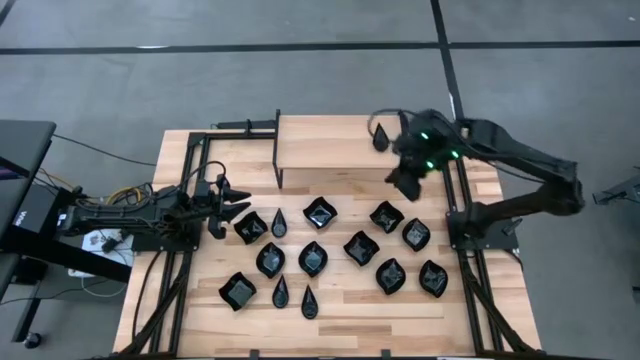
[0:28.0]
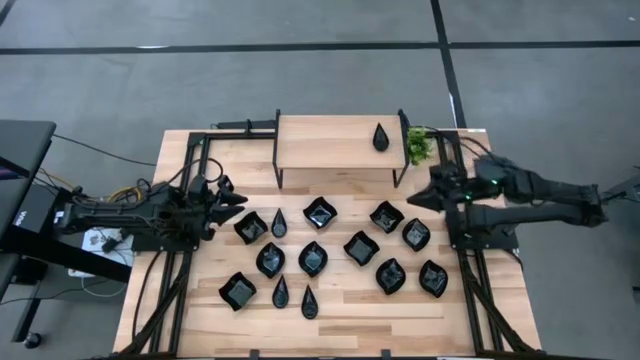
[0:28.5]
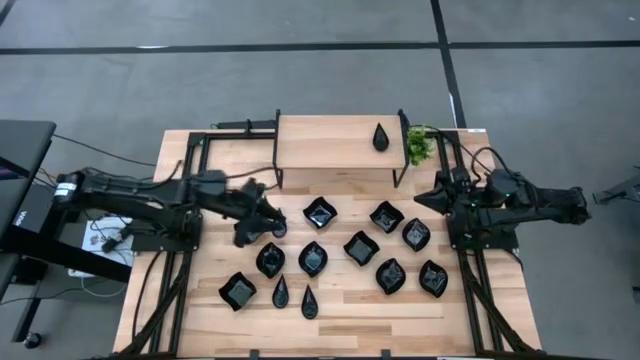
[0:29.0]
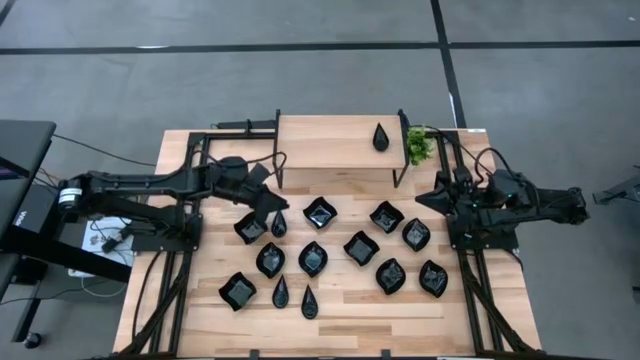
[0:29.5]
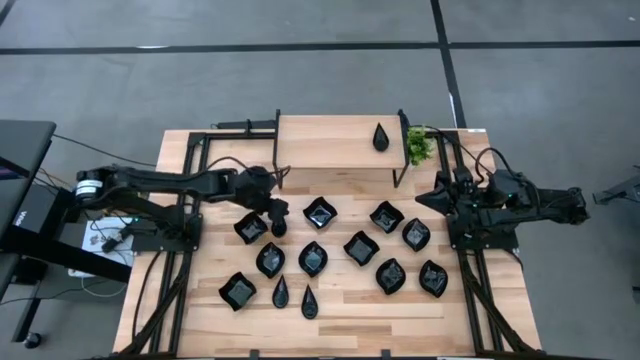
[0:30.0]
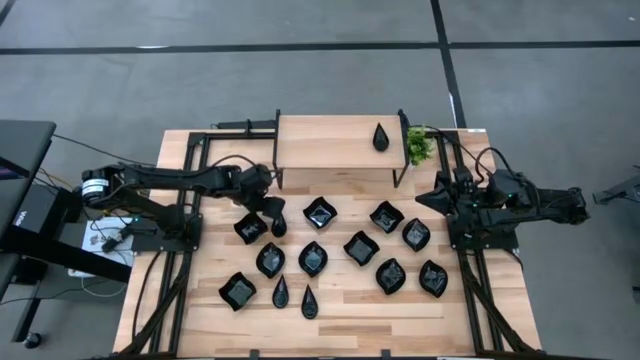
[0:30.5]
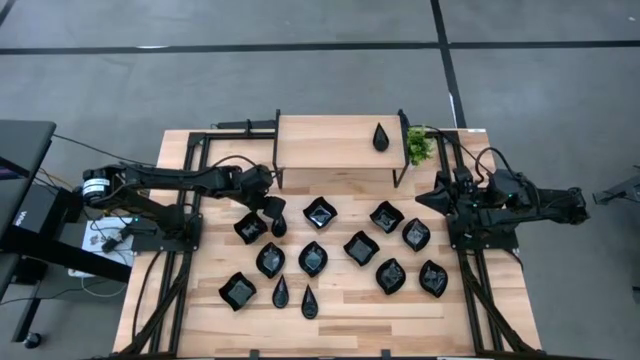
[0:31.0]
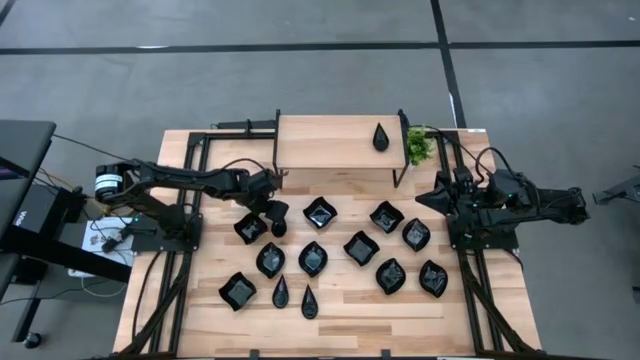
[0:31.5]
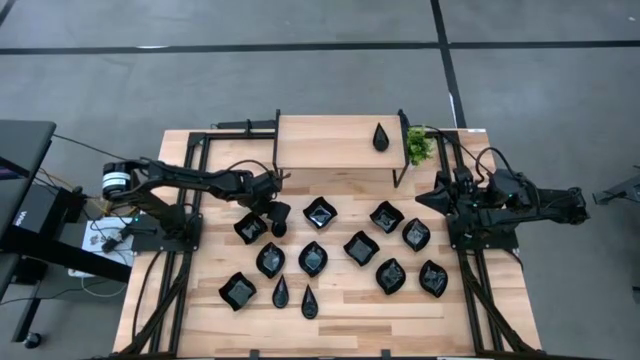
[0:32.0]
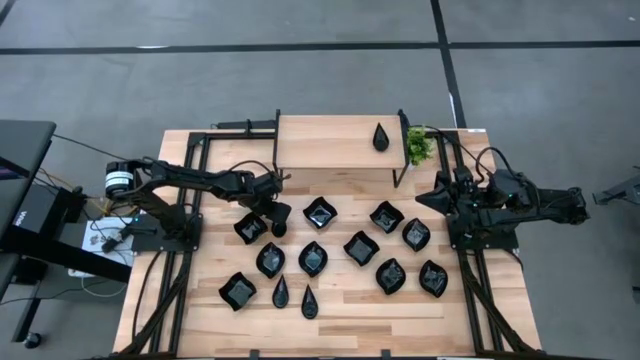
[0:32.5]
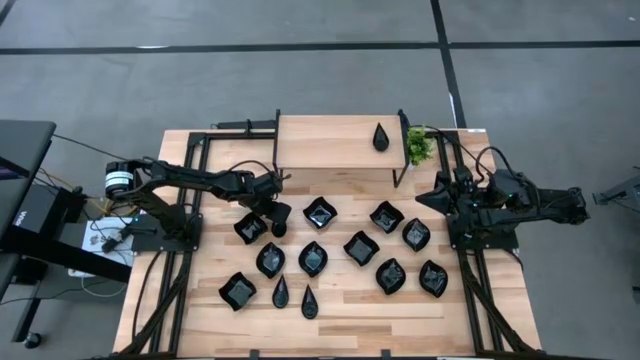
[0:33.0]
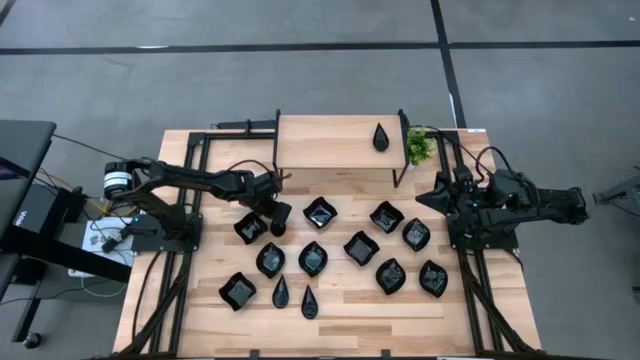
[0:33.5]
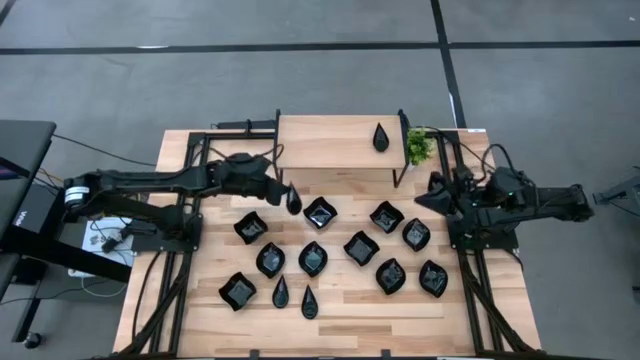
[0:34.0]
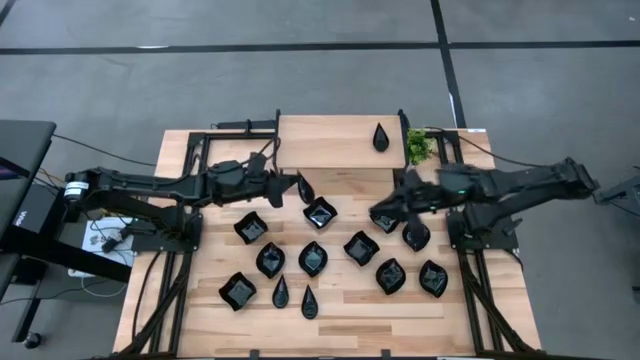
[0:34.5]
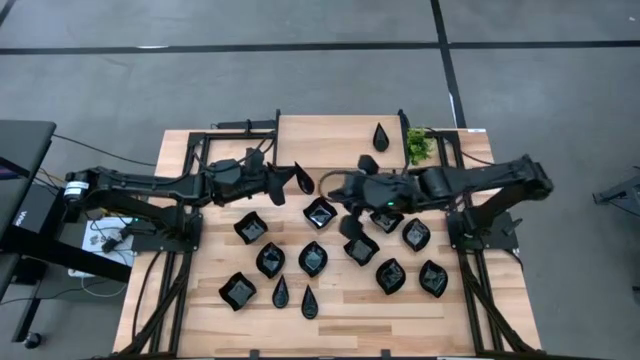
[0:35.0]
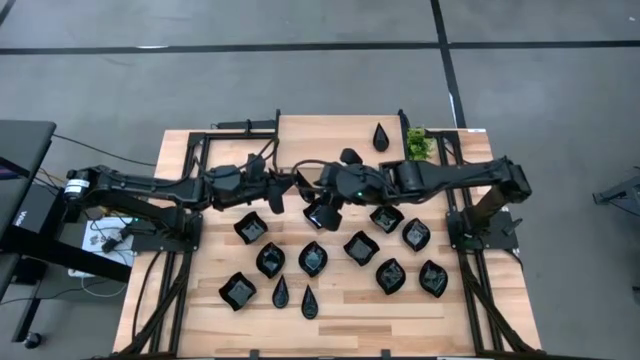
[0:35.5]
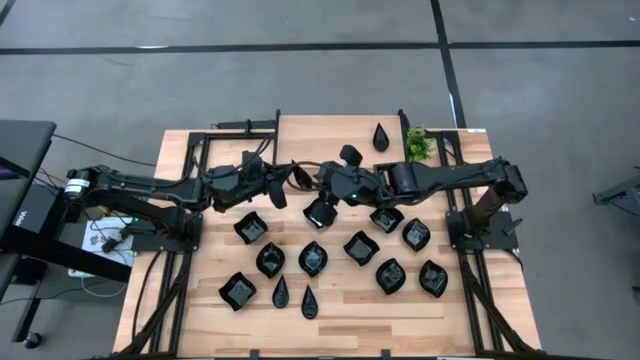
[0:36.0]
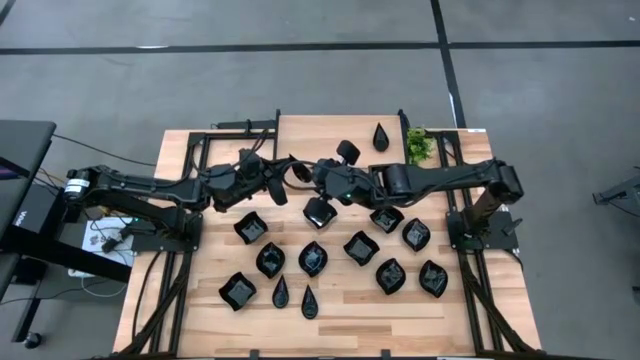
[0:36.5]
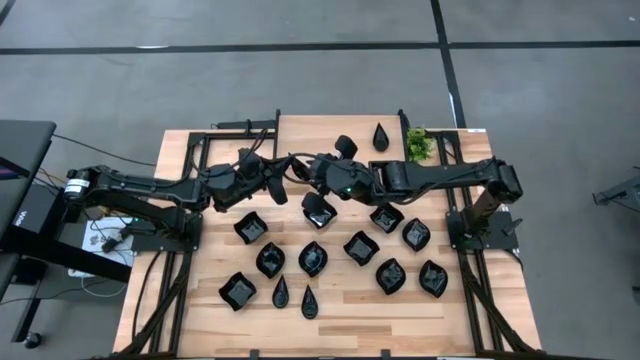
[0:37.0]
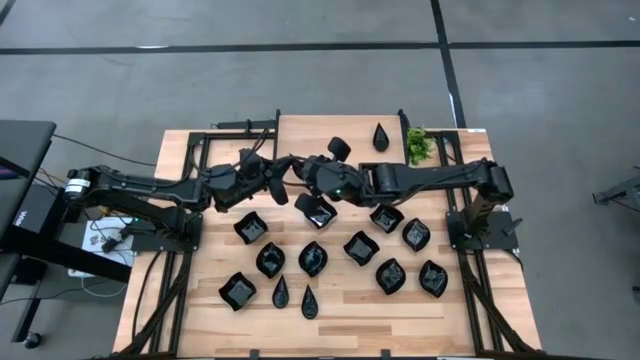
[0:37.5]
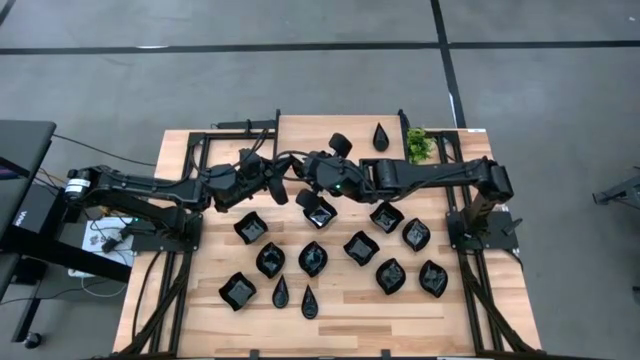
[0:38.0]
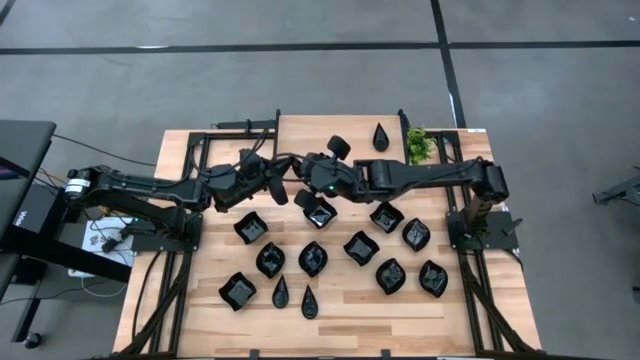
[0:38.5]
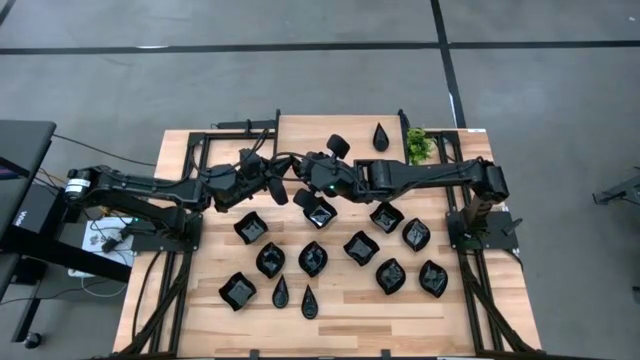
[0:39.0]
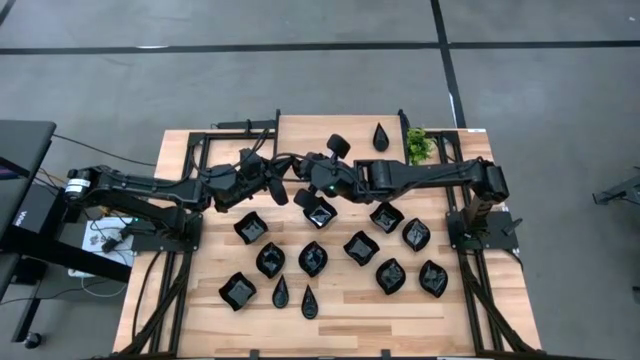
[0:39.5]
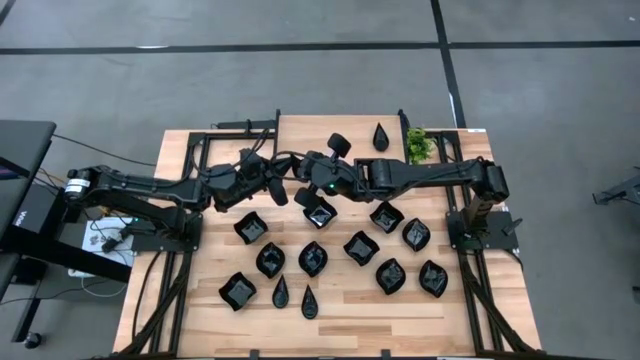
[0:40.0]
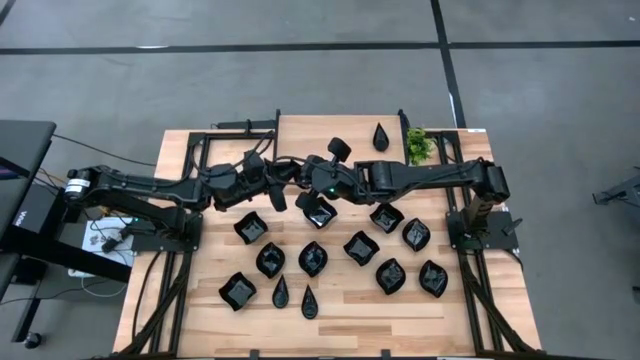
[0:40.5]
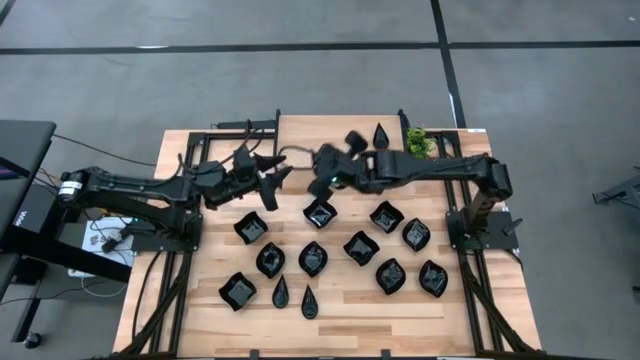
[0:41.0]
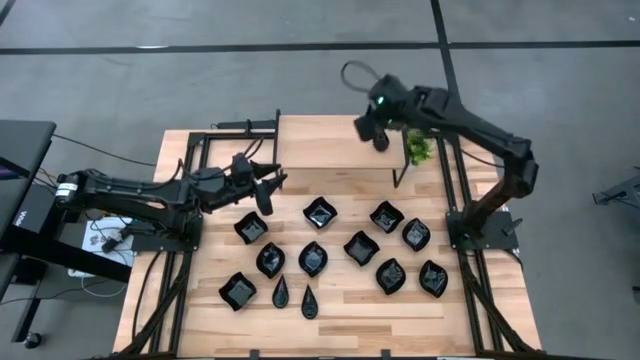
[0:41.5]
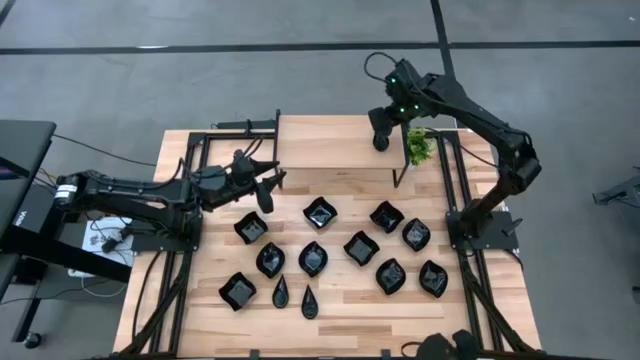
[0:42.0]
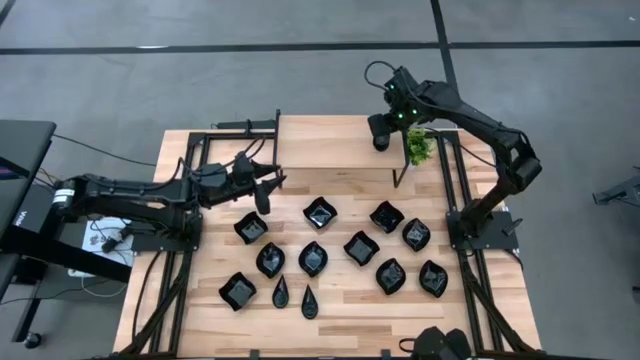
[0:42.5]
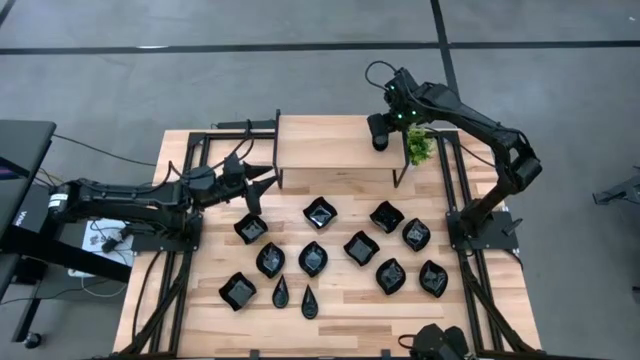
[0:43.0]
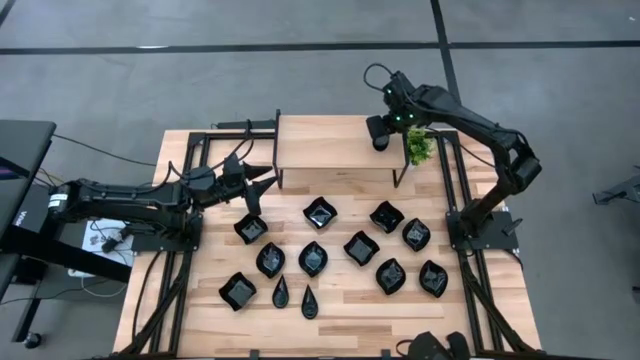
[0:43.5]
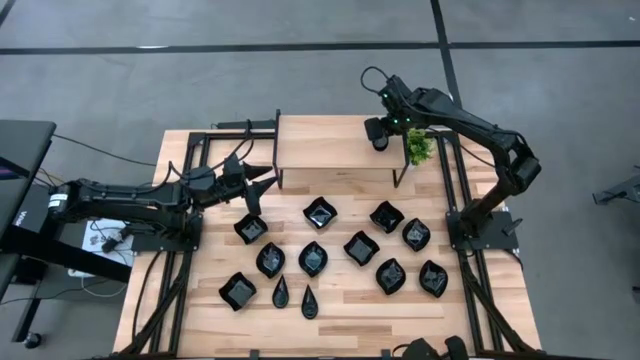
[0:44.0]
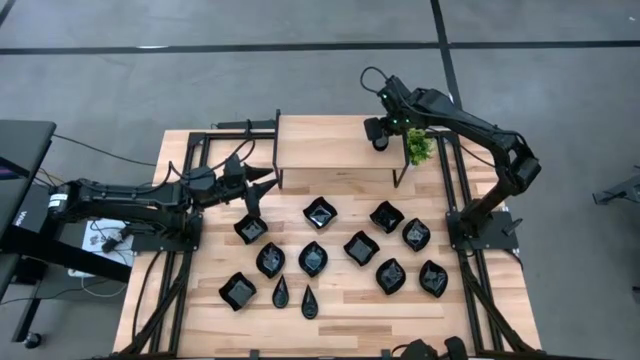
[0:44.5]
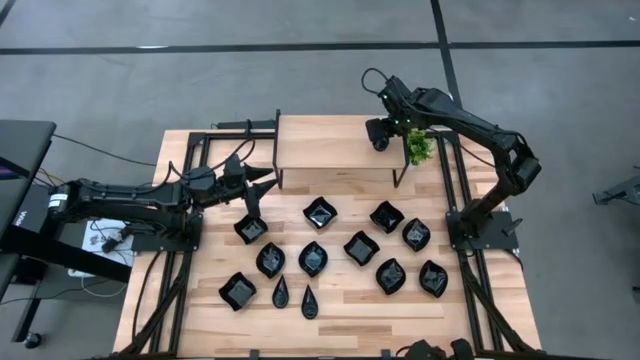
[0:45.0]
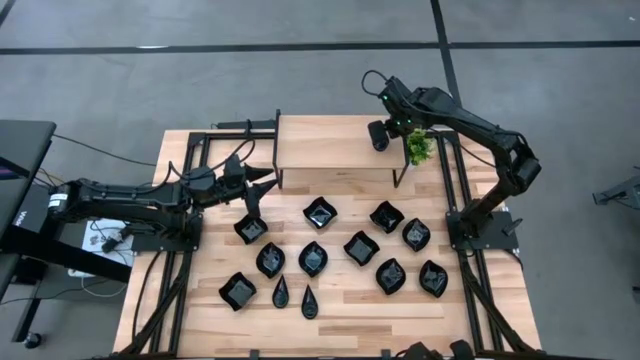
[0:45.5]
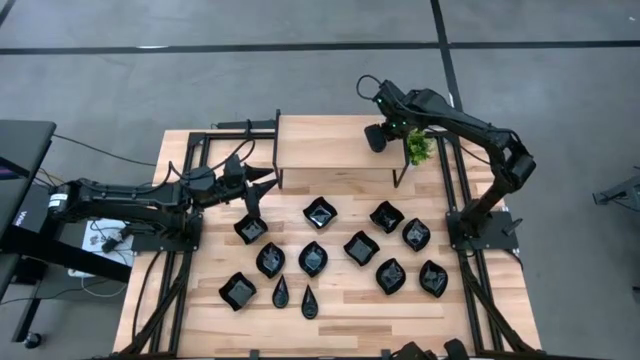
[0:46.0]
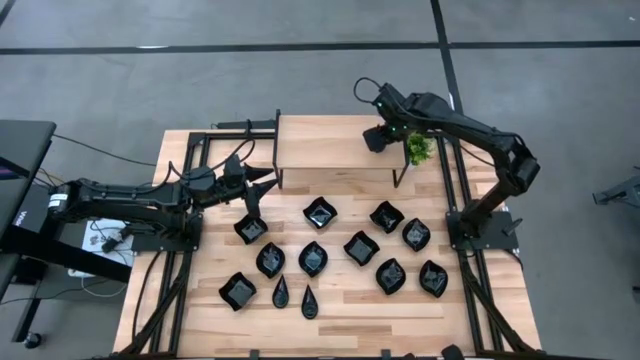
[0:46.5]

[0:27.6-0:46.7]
Task: Pick & Place Mini shaped plates
Stack the drop-shaped plate on top of the other drop-shaped plates on the shelf

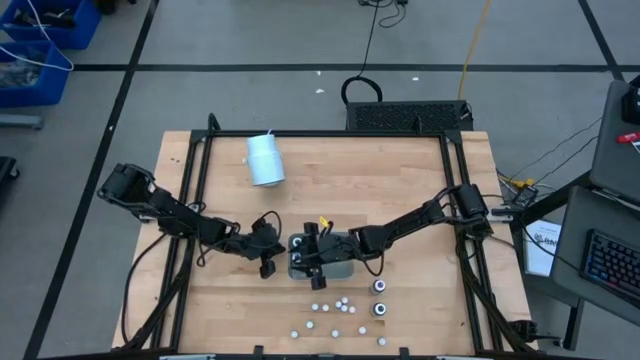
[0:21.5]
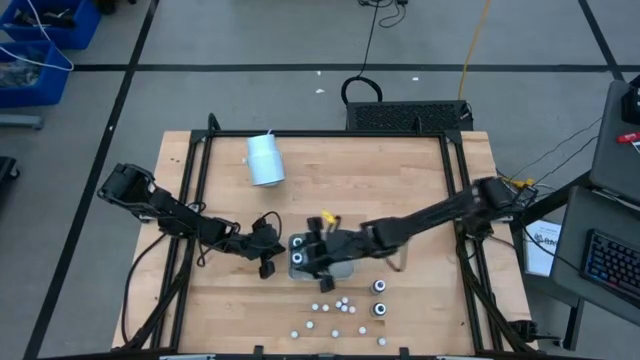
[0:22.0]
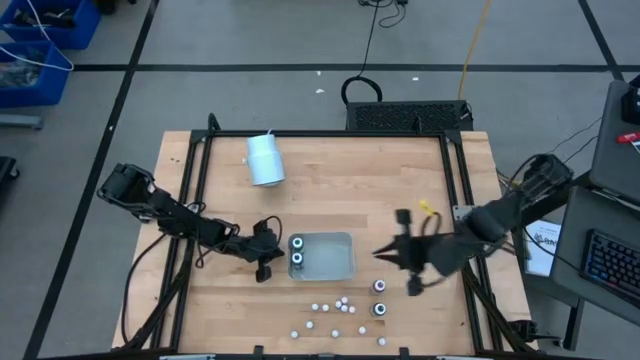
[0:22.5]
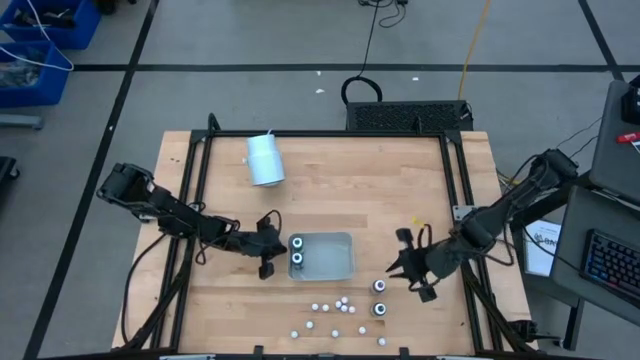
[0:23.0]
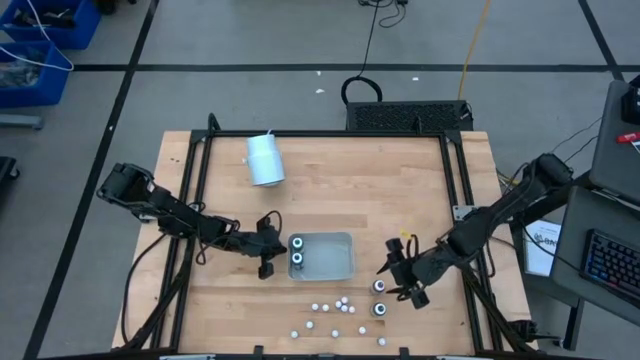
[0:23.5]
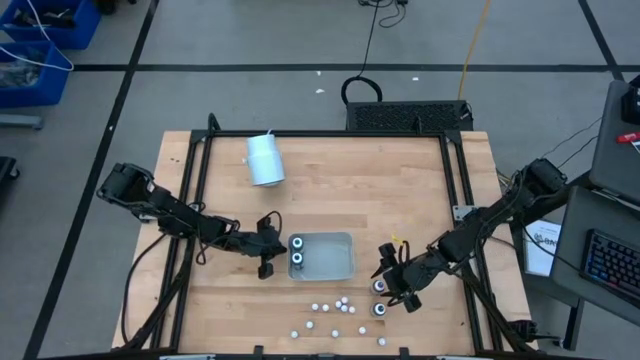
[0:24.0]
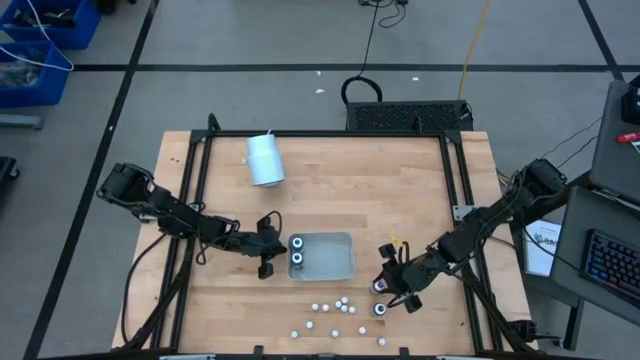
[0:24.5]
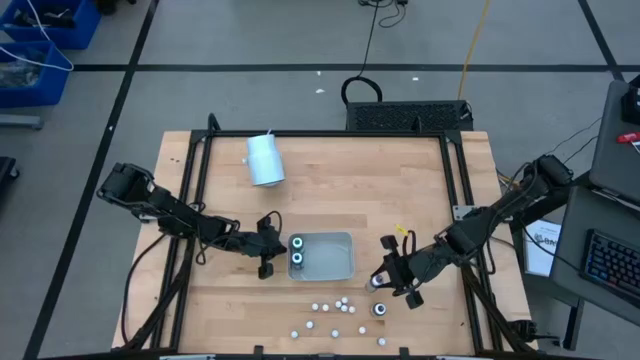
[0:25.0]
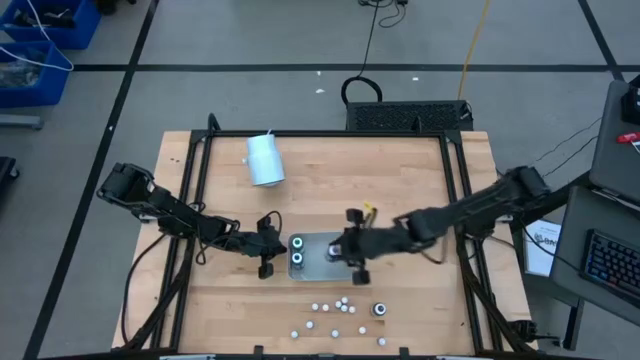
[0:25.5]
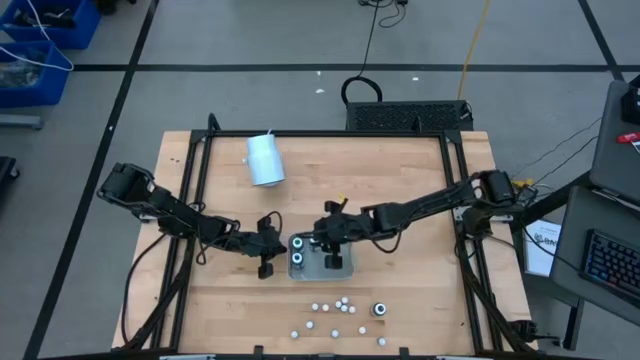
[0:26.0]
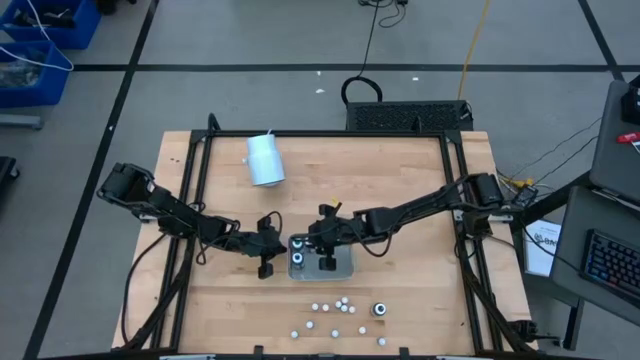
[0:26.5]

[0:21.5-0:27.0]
Task: Pick & Place food coloring
Put the big purple food coloring bottle into the gray bin
